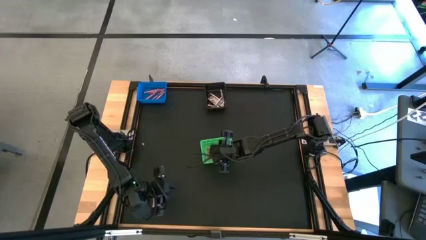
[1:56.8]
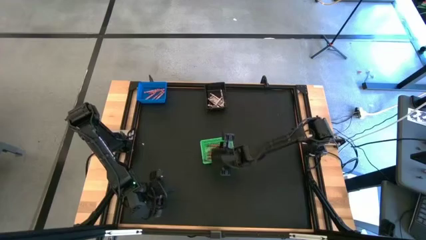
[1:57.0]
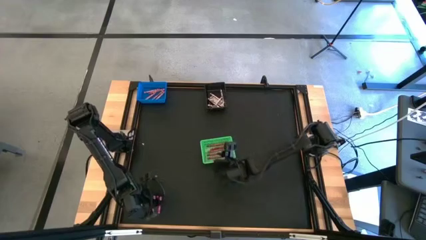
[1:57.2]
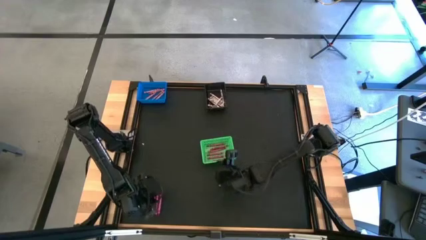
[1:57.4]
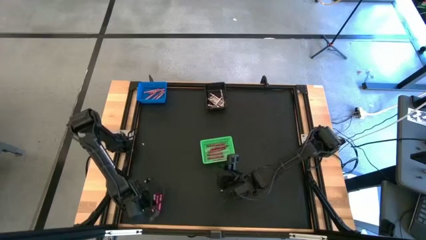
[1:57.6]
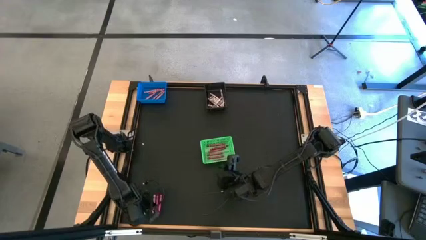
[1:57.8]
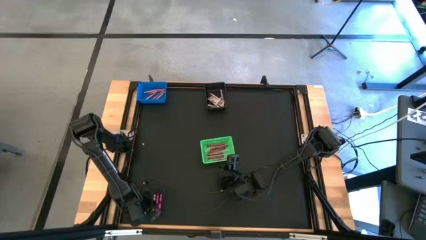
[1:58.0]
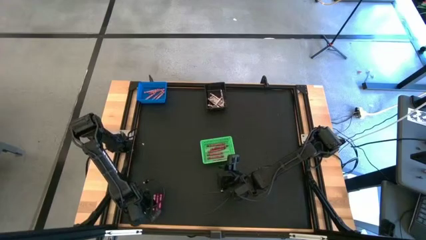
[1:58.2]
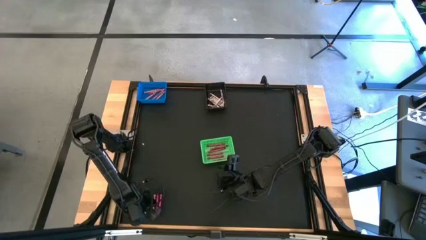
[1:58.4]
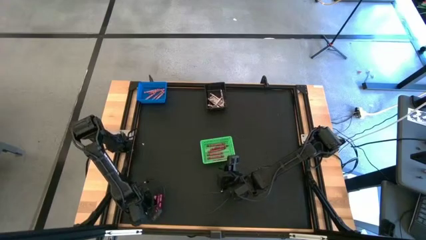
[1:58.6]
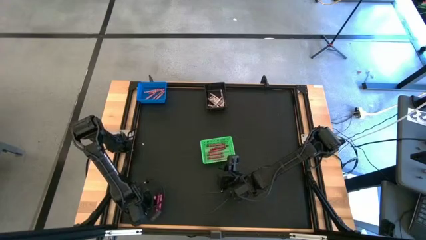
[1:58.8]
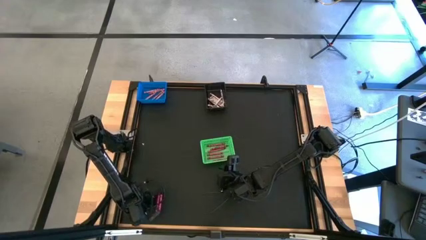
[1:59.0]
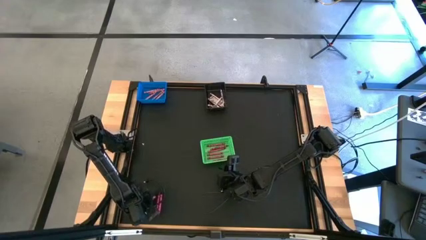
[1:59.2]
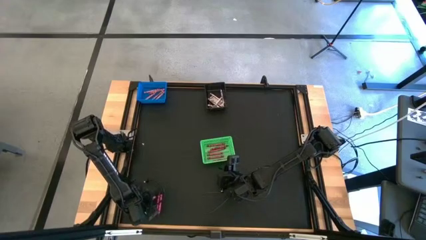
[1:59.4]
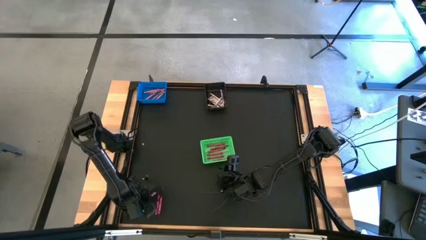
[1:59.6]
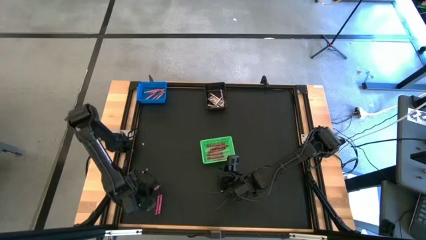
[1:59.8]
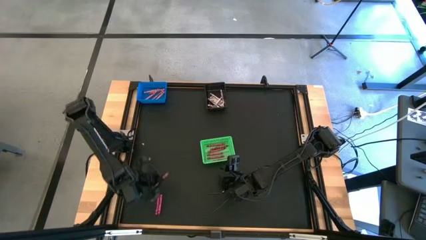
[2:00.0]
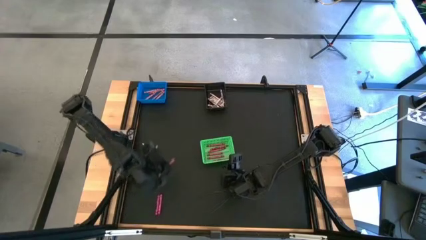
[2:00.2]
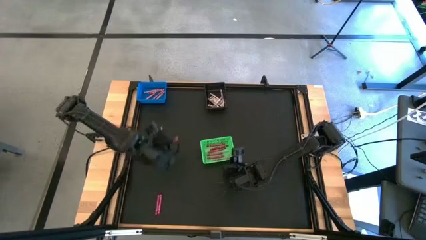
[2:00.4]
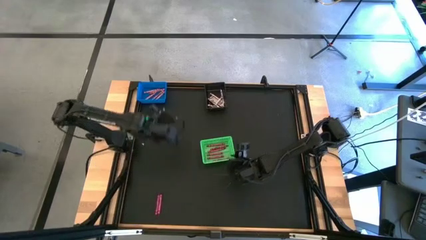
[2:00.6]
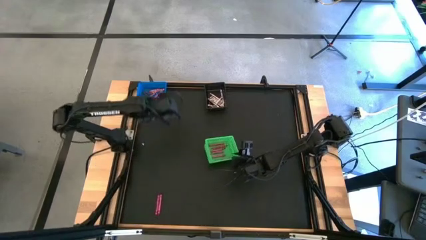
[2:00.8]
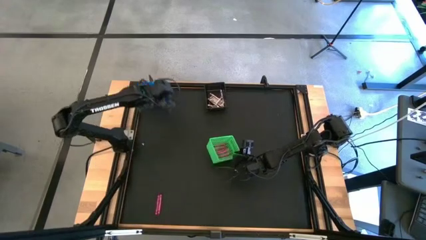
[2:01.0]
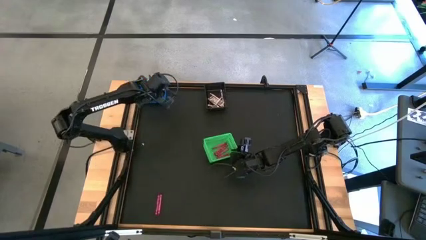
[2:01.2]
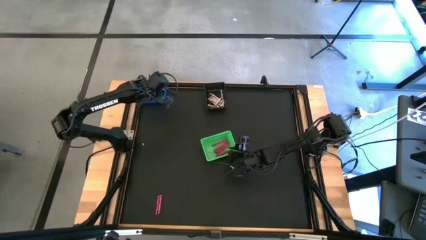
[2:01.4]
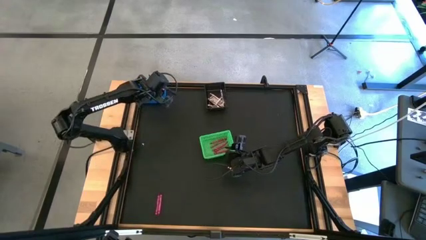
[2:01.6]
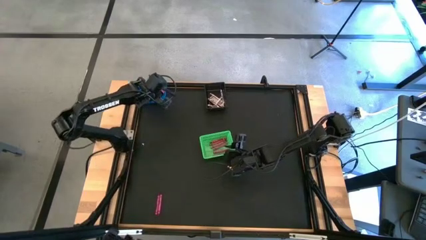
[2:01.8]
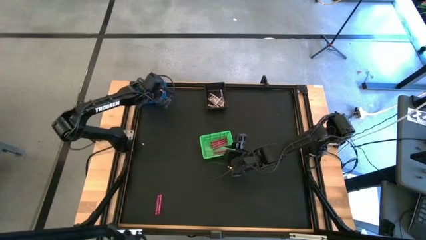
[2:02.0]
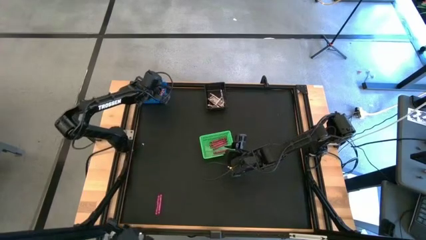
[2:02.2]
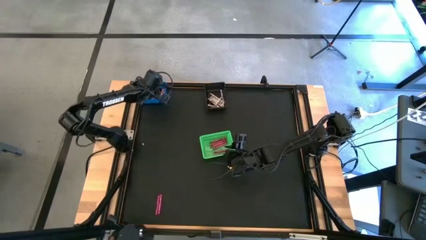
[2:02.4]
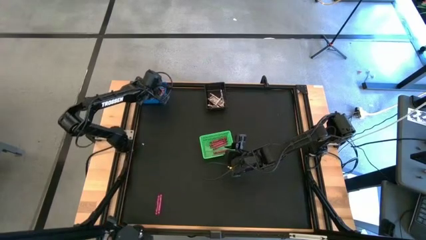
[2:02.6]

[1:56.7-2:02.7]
Task: Sort crayons
Put the pink crayon into the blue bin

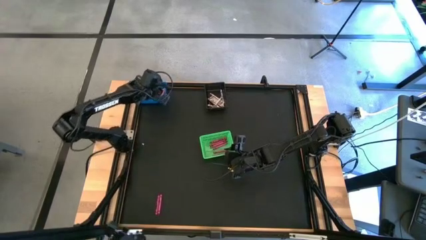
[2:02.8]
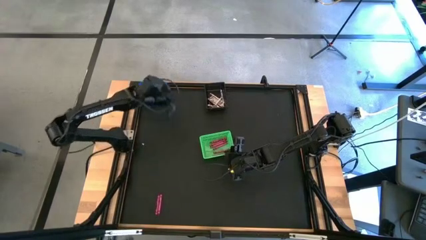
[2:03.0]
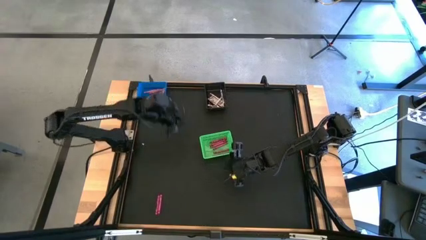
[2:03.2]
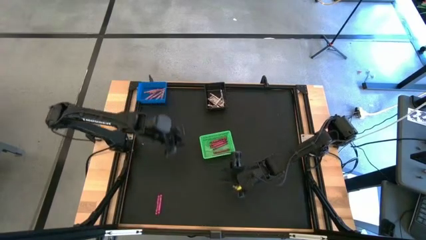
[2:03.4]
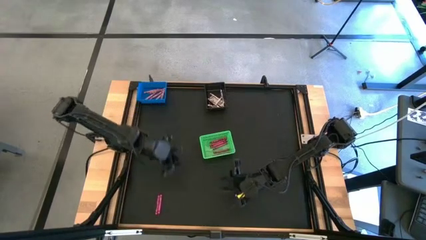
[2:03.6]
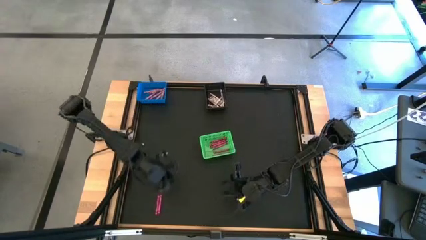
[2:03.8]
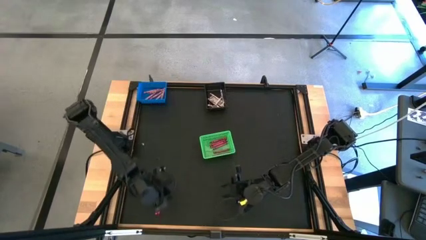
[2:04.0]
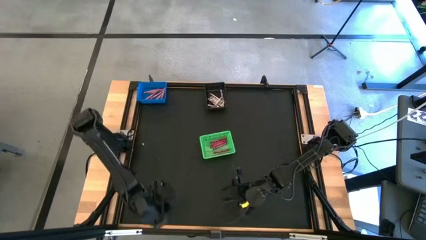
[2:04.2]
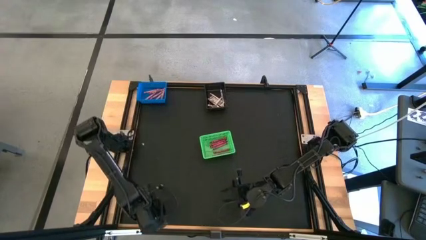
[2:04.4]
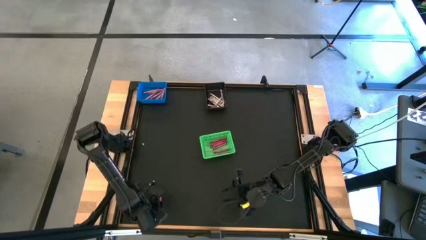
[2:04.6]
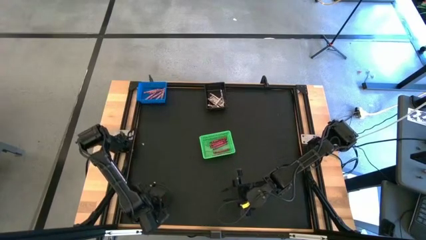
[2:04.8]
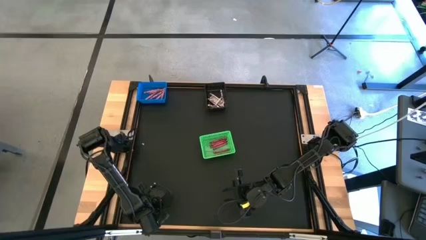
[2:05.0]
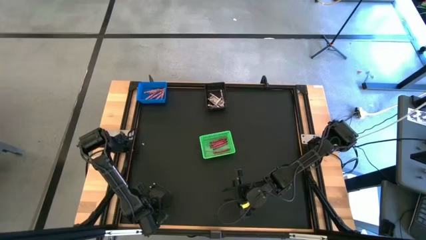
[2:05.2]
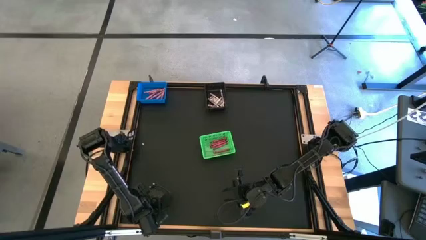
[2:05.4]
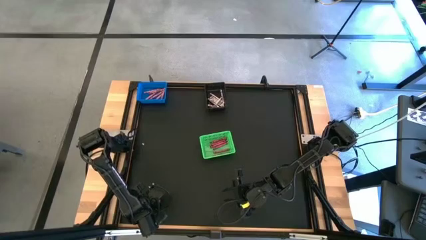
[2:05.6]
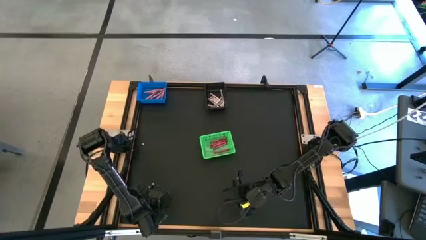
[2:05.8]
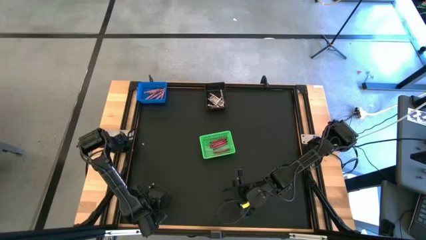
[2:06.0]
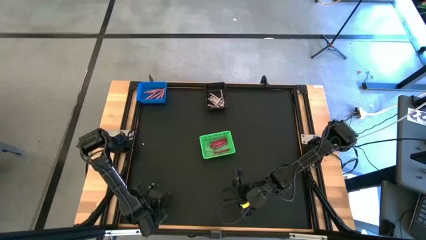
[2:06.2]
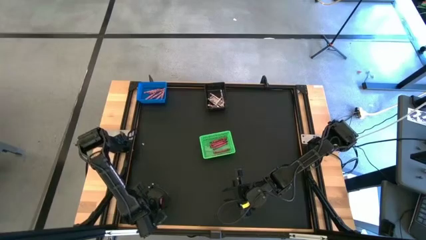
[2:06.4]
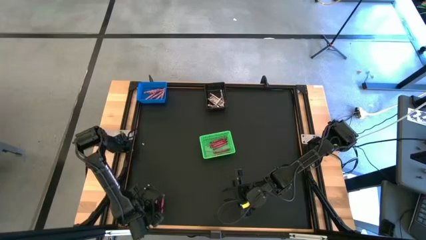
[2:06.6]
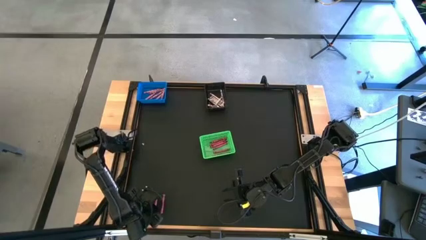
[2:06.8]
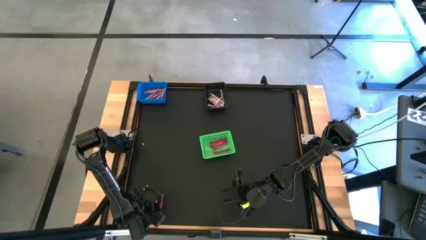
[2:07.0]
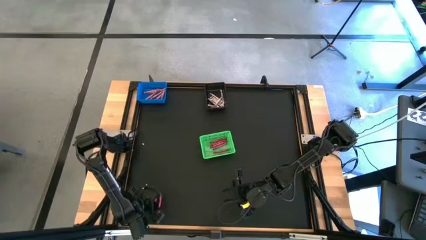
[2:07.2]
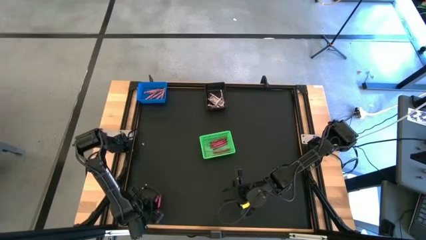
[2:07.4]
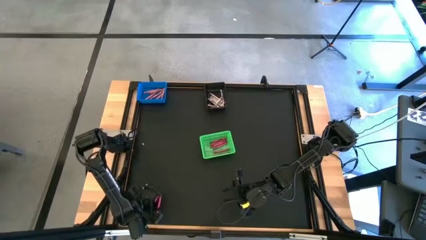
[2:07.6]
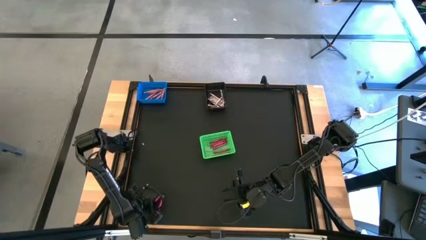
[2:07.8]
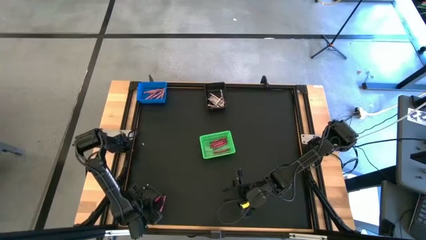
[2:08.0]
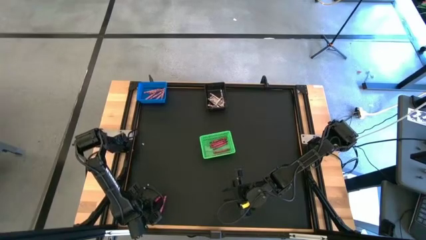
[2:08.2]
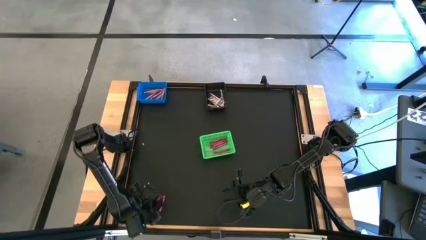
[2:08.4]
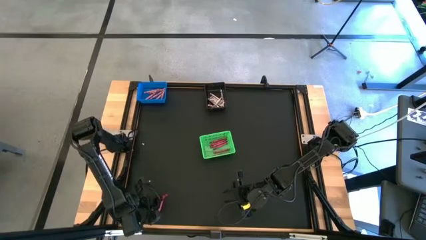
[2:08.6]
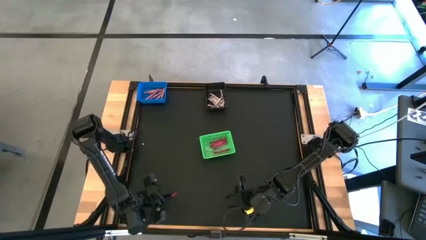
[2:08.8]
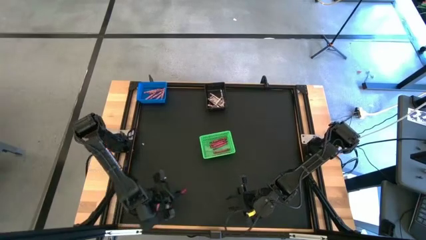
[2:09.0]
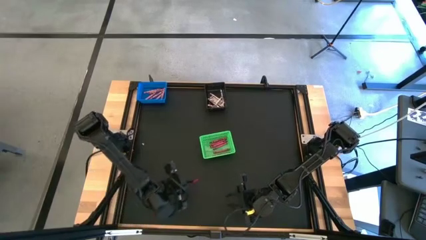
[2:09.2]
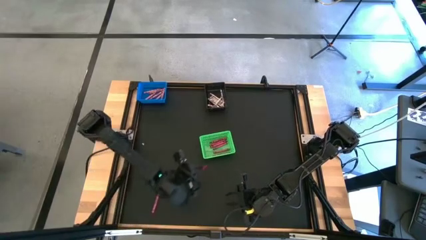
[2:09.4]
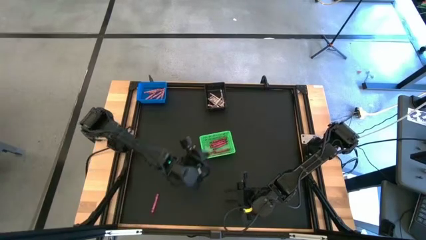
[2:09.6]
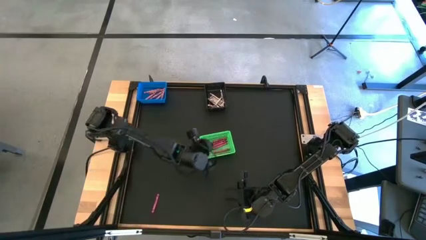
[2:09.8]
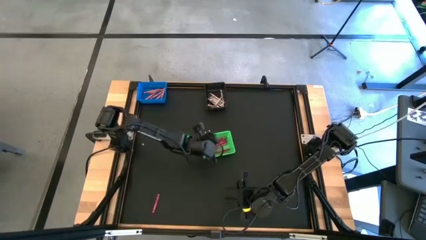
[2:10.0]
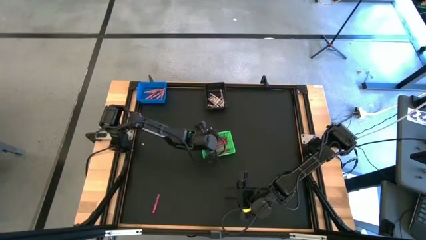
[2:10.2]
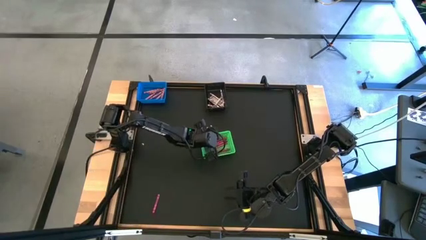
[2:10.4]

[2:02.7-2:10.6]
Put the red crayon into the green bin

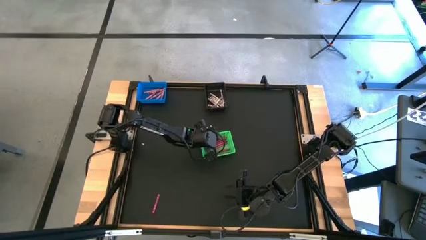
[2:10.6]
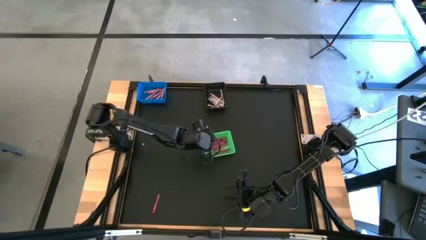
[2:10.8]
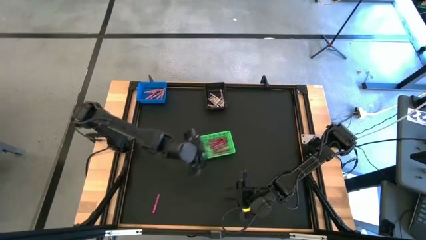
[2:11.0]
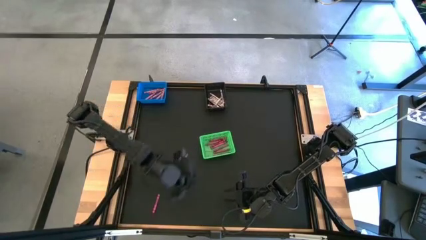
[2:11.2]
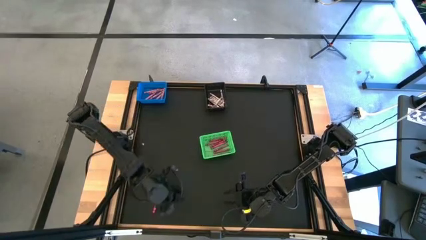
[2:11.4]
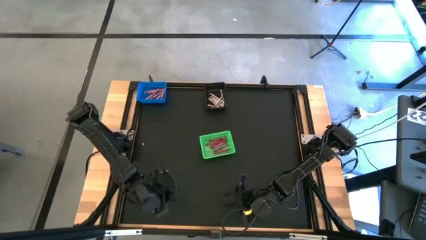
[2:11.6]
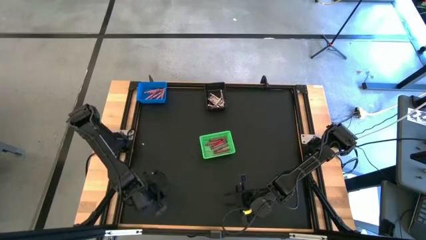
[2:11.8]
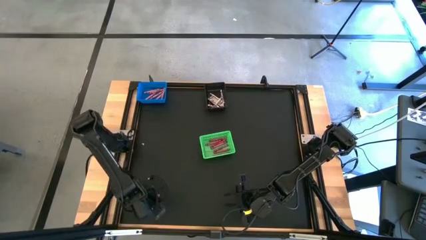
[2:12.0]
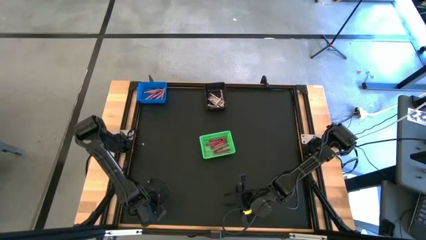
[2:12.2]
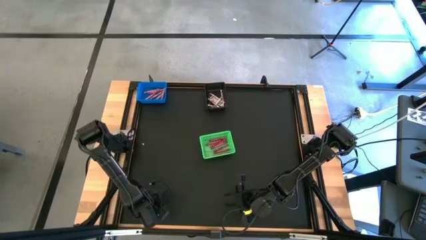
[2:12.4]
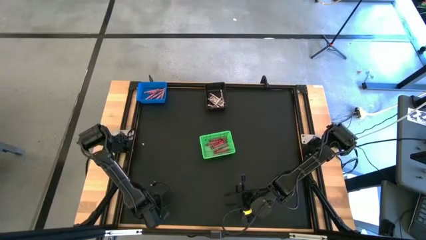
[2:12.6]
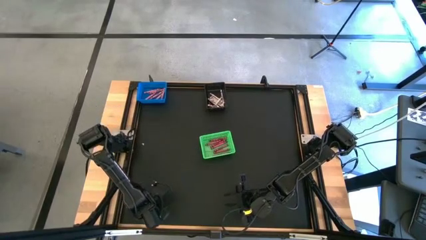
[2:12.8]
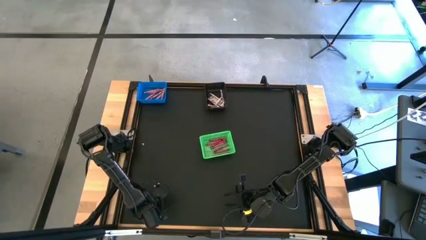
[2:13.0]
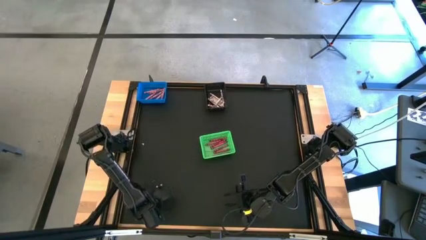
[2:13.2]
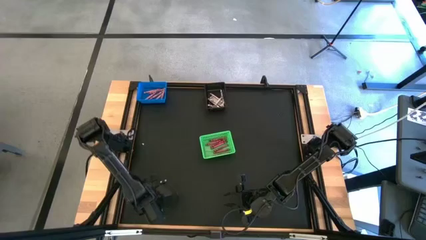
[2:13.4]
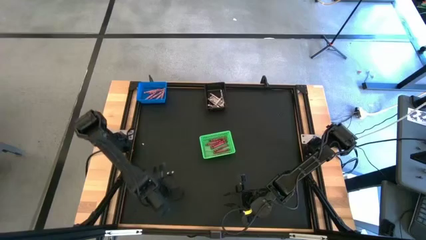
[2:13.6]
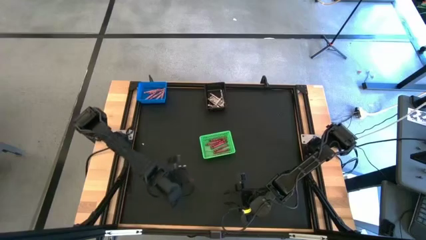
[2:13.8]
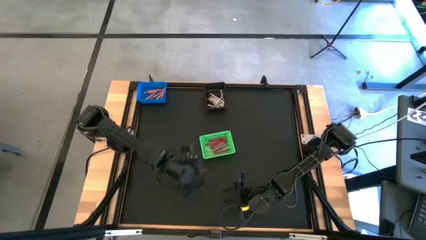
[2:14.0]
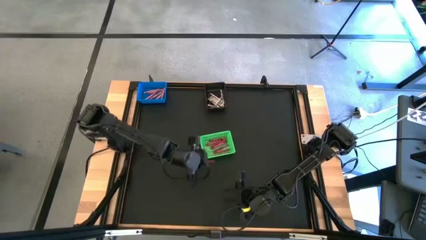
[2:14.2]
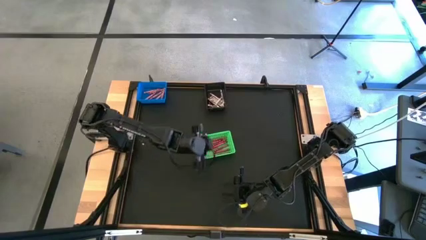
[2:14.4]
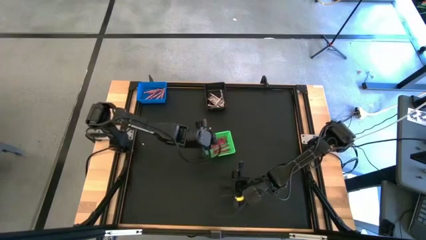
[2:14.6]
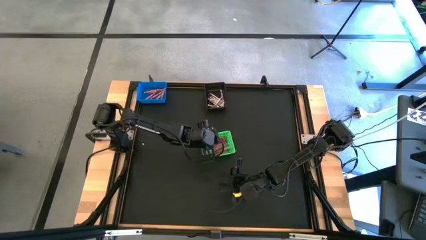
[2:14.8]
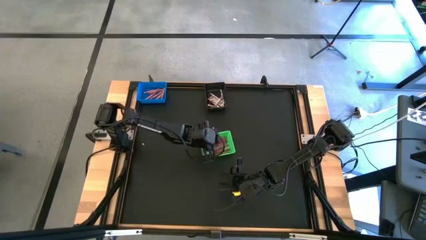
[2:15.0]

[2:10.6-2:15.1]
Put the red crayon into the green bin
